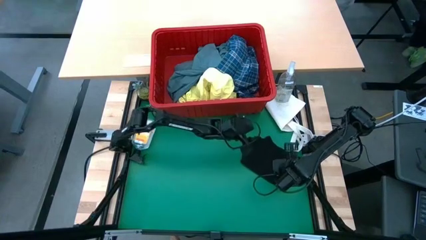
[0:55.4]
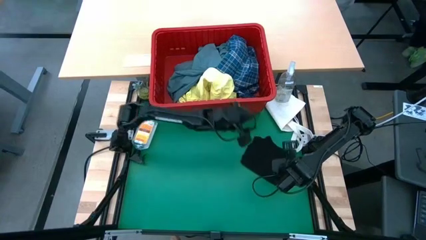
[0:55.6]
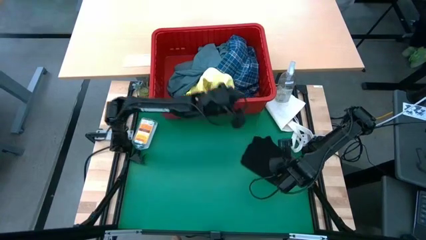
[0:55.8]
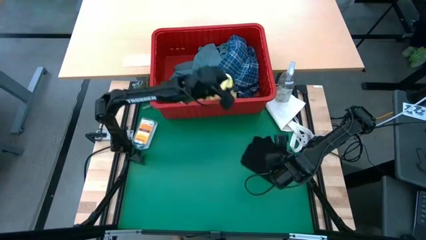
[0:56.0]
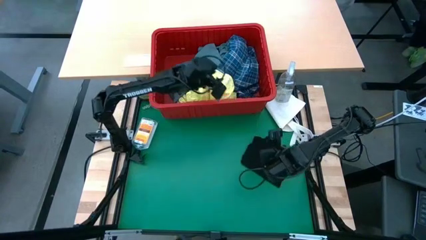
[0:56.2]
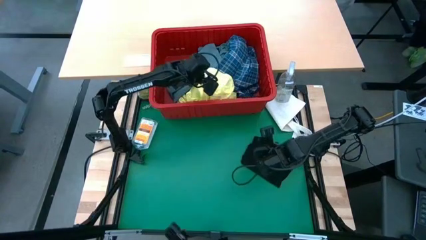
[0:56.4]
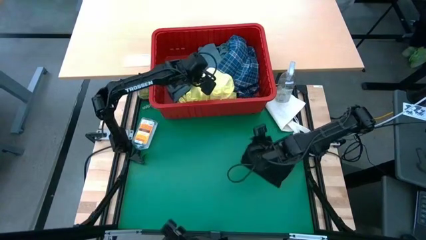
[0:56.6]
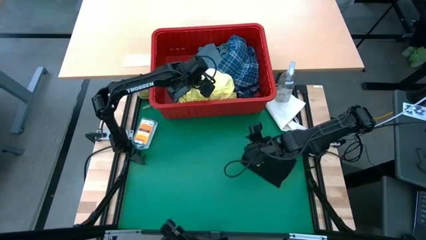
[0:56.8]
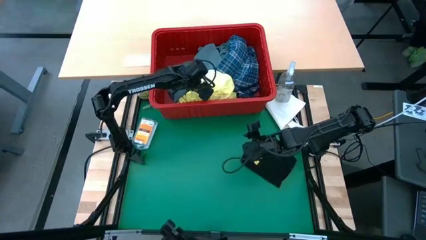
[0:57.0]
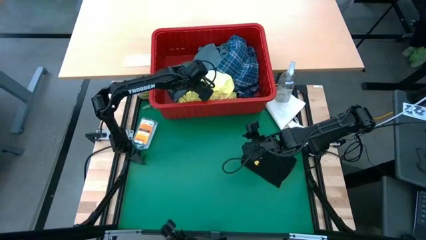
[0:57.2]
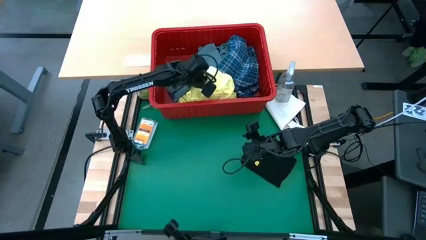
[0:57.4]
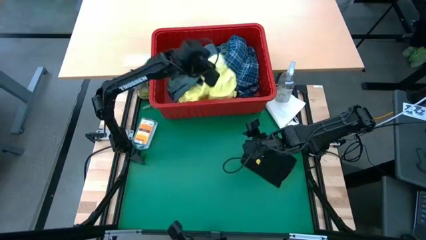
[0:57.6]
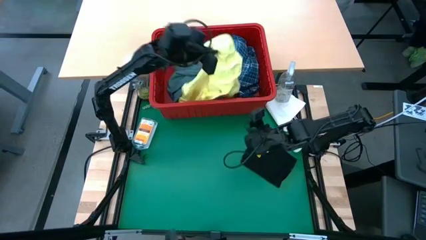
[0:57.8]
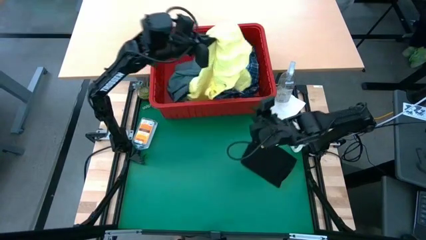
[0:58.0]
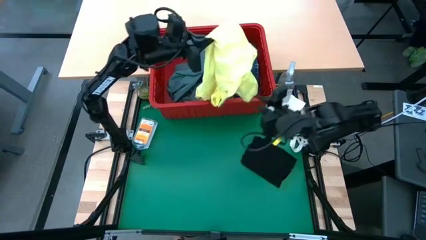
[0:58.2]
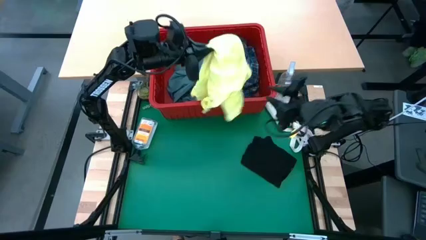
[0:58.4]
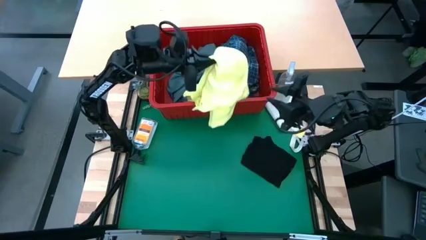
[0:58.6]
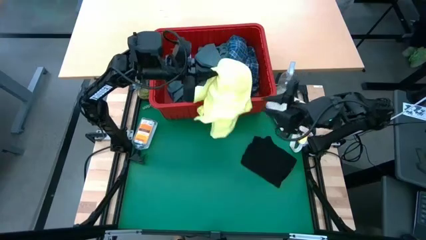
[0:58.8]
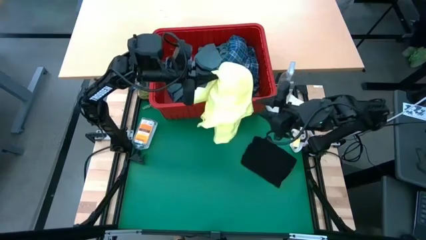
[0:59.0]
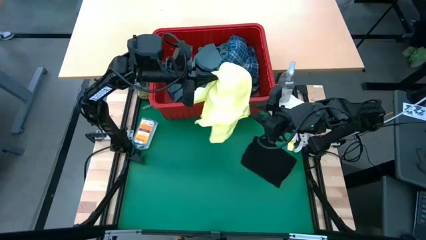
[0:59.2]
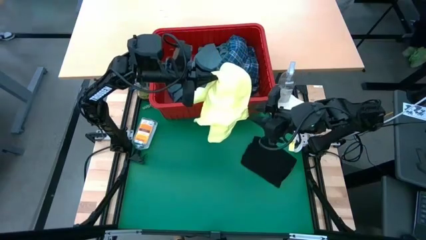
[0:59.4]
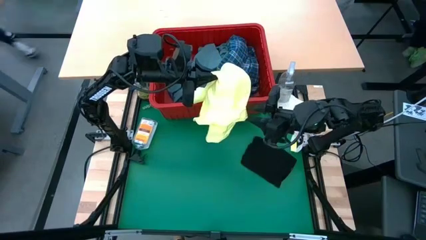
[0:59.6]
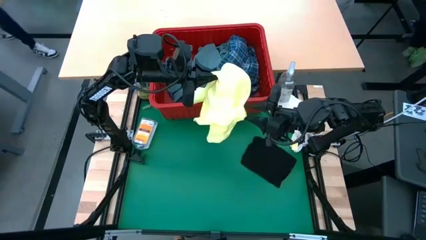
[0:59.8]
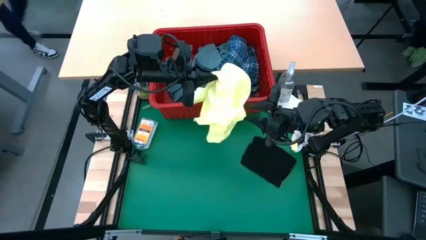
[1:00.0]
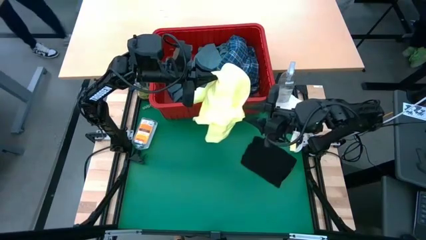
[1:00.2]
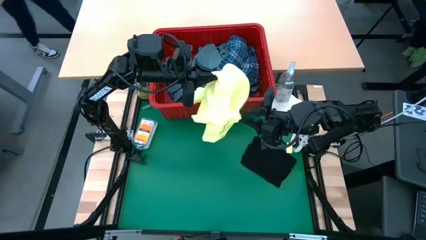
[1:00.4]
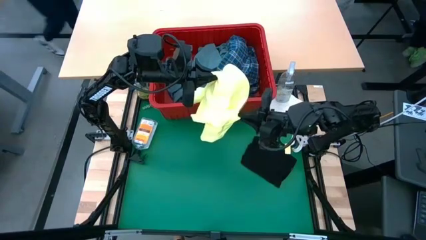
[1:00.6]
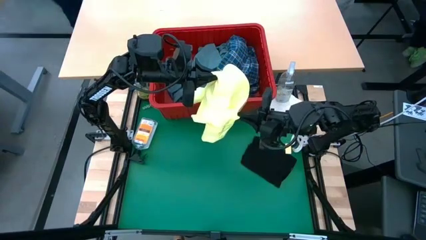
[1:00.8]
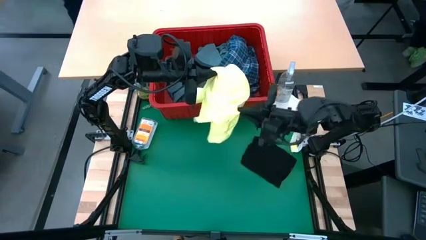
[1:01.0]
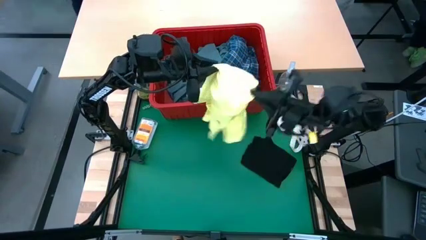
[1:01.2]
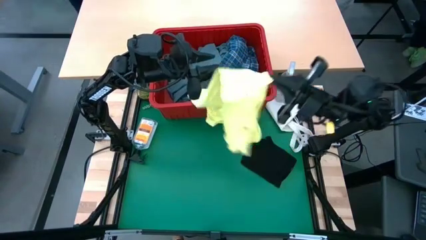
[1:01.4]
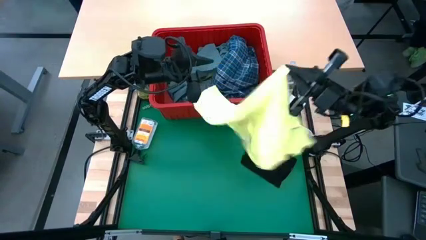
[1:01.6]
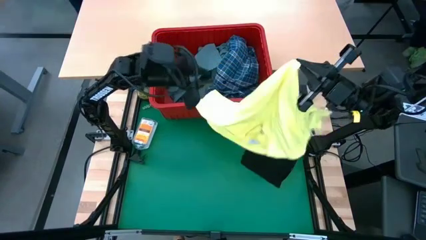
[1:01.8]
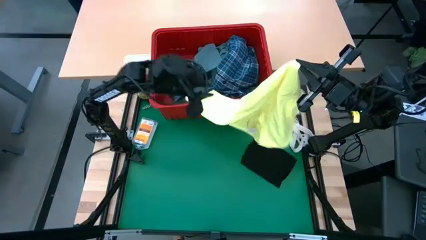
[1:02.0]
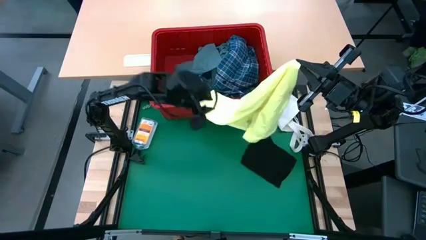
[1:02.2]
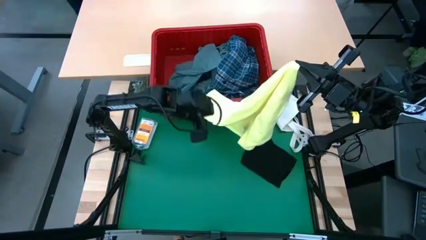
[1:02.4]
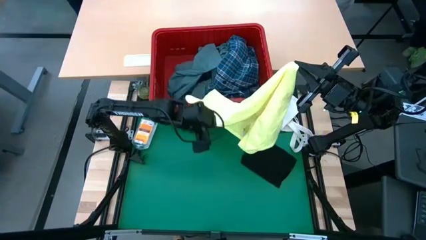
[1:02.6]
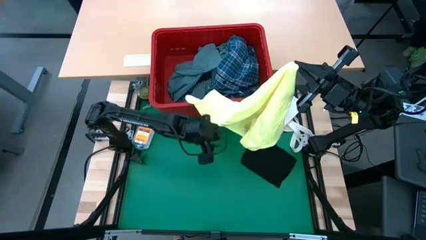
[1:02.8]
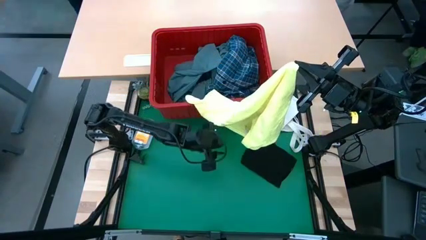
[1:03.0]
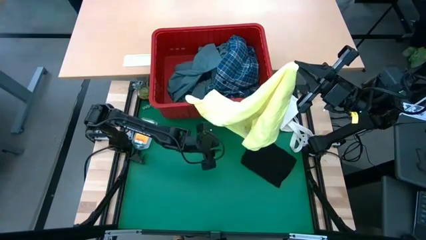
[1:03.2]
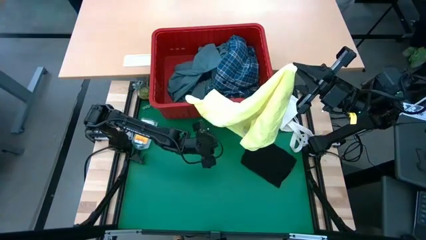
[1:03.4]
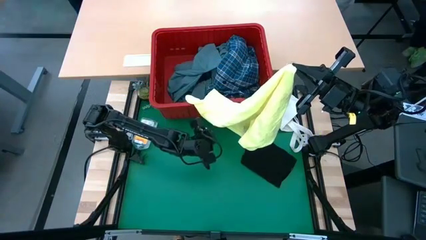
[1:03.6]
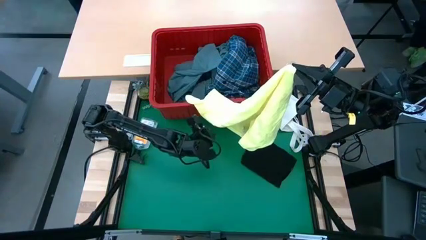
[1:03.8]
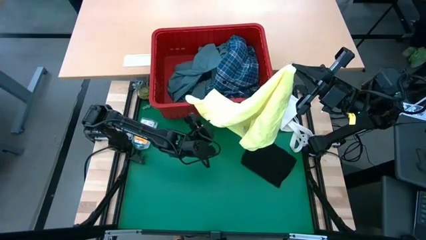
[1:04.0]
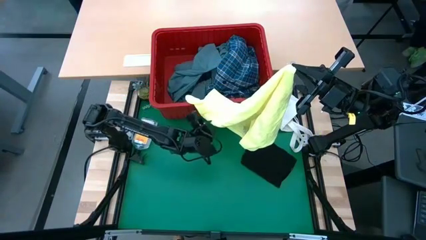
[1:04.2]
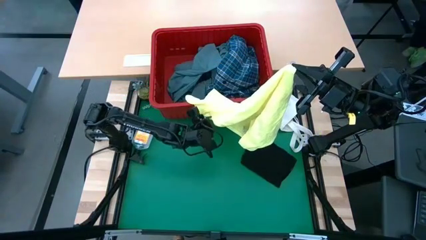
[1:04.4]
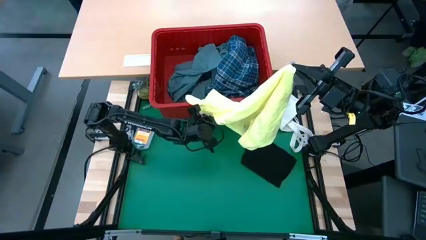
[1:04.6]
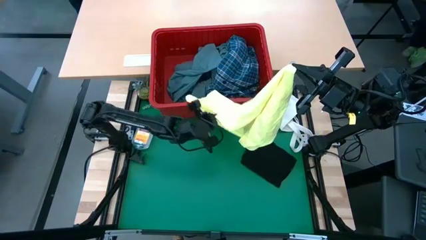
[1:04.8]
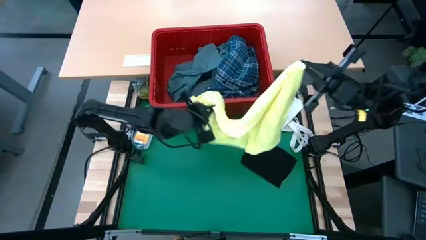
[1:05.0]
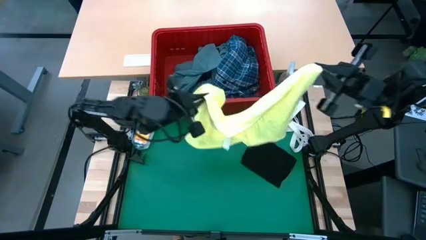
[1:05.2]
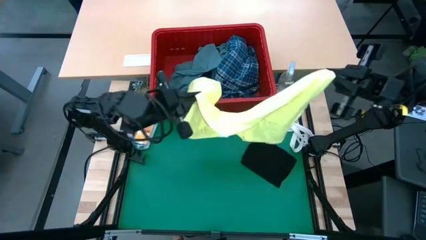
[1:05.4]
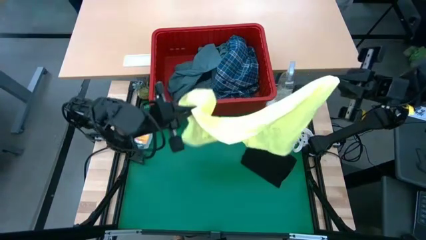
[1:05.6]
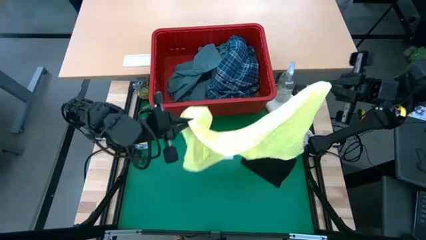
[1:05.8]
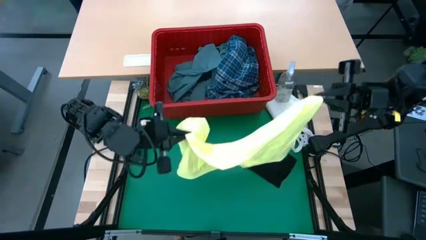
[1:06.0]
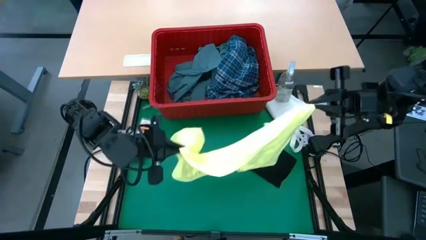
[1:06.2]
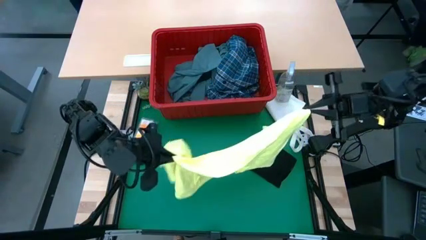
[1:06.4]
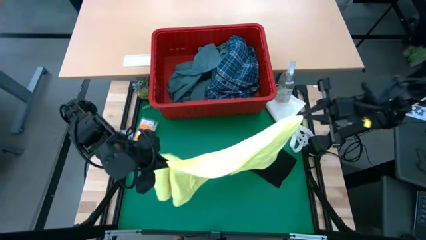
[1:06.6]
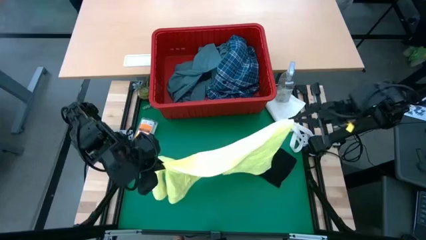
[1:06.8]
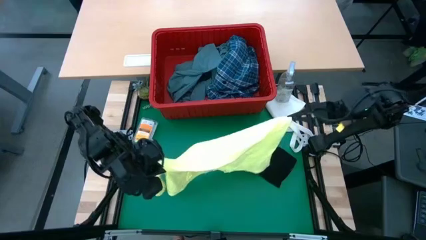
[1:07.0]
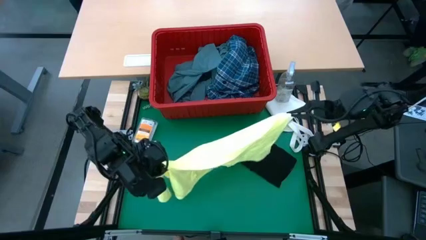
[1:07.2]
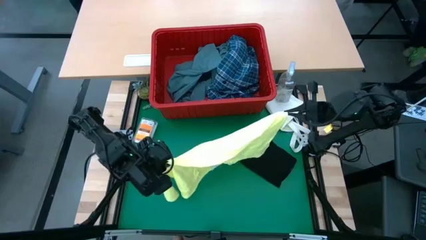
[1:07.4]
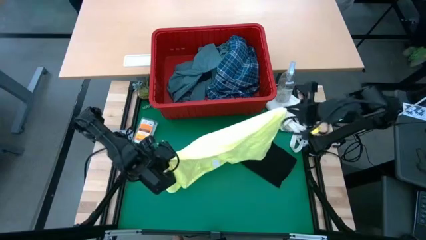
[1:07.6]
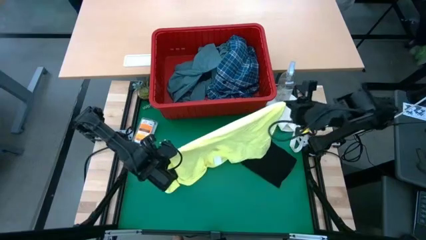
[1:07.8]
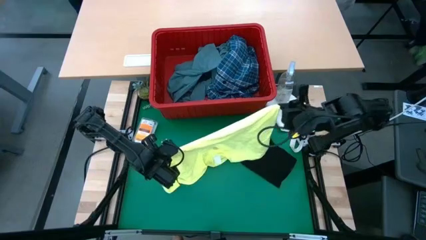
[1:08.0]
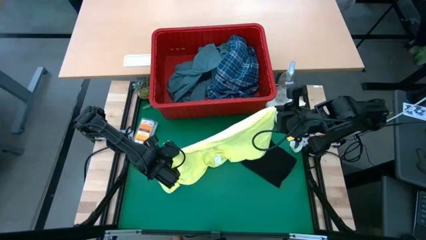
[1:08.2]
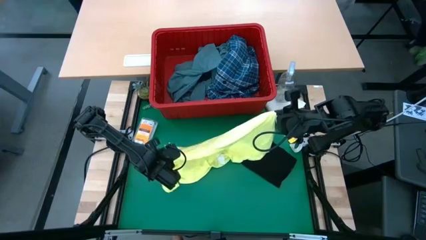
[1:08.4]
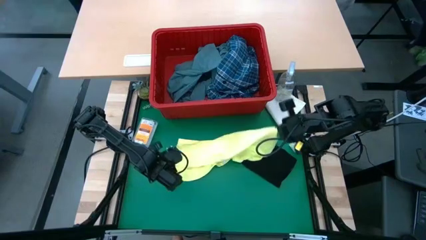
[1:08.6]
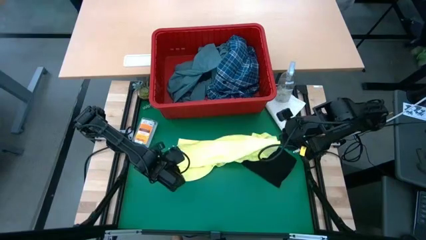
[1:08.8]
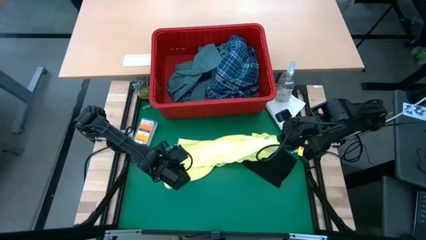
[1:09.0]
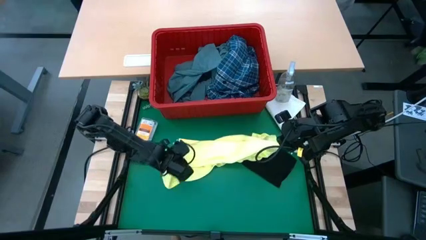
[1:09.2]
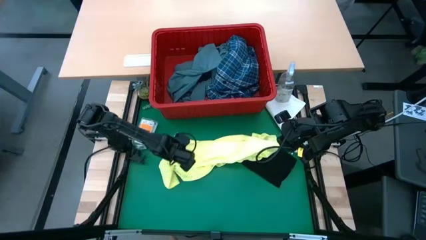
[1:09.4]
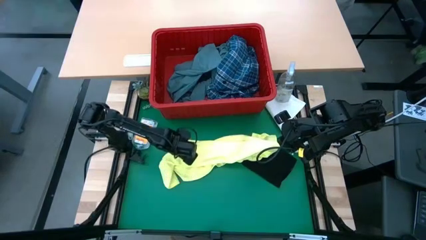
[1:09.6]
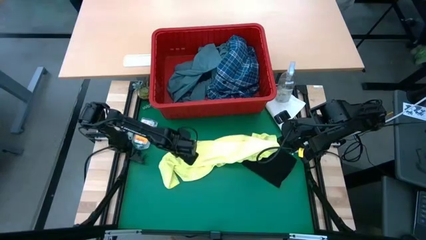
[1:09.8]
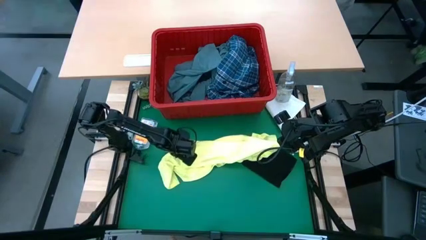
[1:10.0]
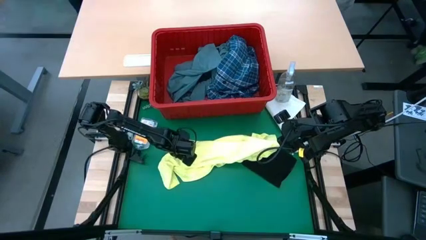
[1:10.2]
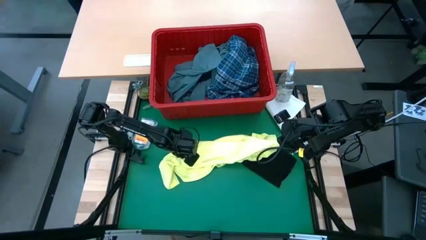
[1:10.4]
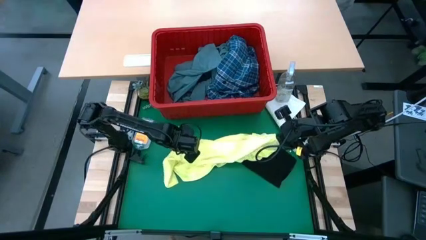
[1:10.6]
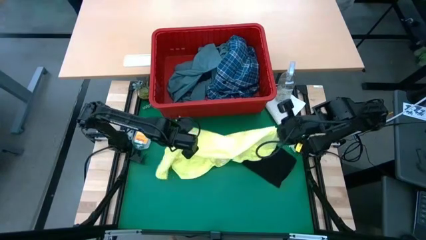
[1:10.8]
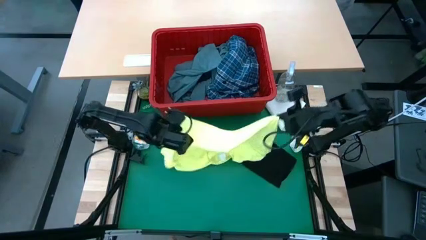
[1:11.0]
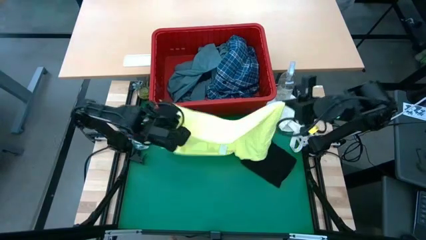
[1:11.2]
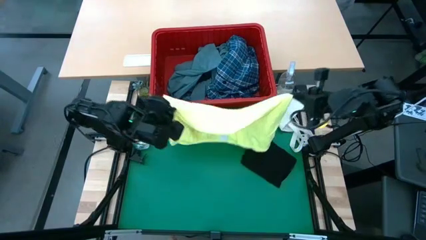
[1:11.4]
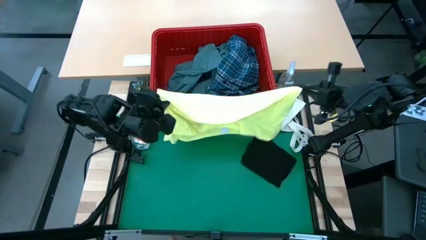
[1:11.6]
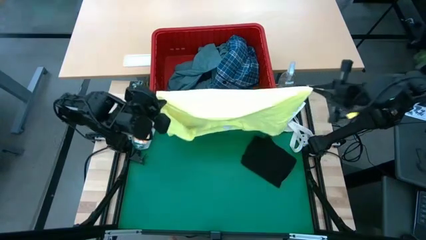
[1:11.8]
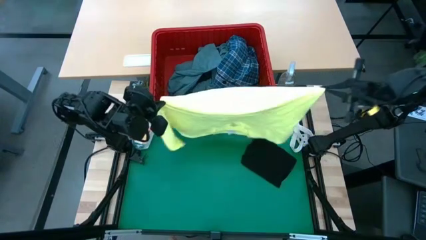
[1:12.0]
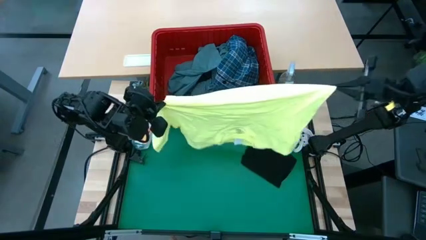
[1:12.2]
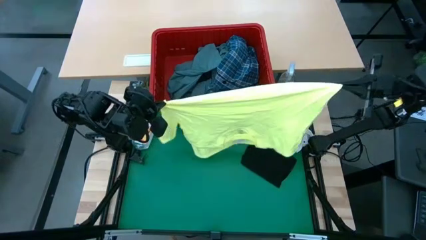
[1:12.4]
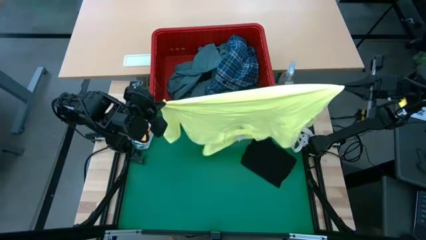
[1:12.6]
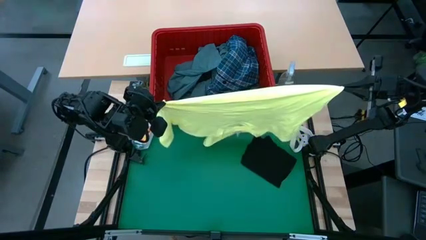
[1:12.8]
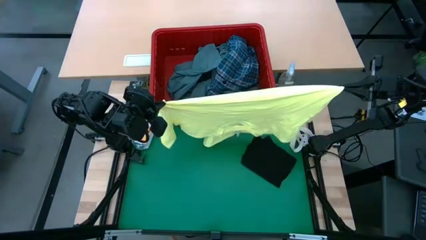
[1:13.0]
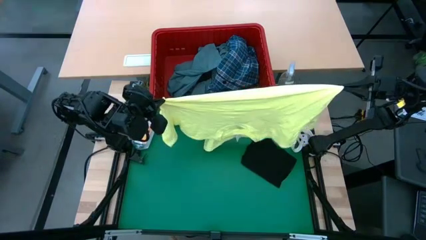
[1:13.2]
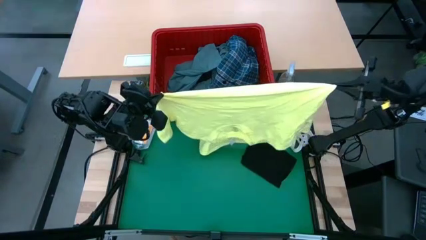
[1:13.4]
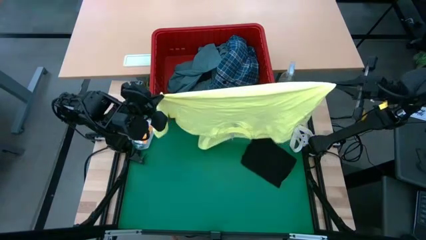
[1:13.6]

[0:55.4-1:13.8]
Task: Fold Laundry from Bin
Fold the yellow shirt
